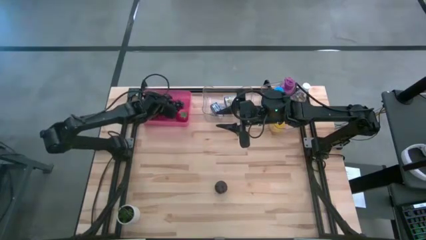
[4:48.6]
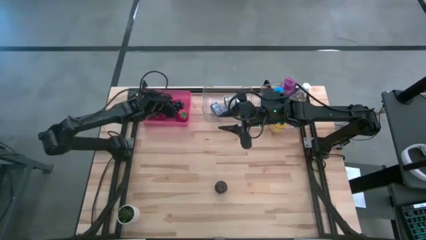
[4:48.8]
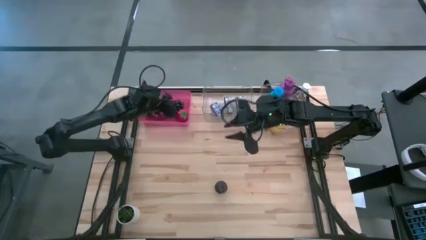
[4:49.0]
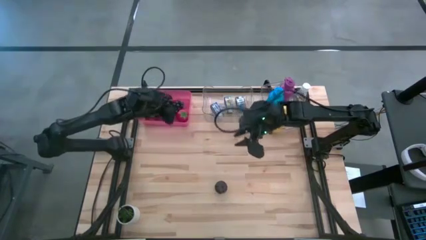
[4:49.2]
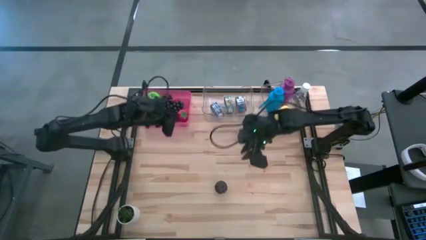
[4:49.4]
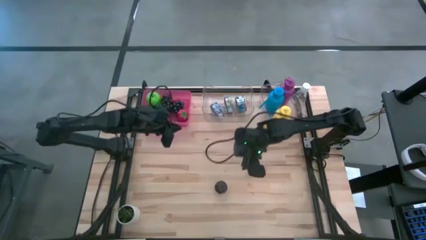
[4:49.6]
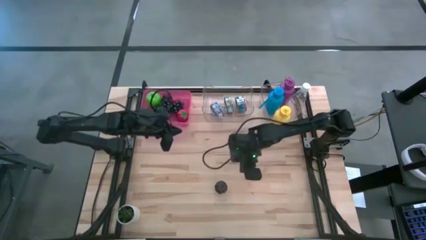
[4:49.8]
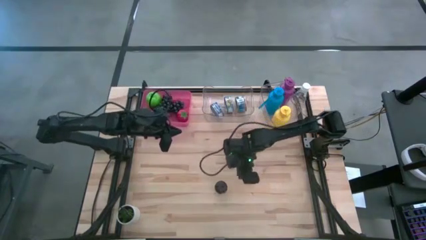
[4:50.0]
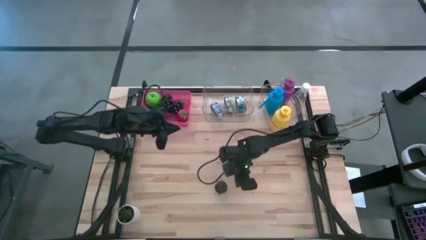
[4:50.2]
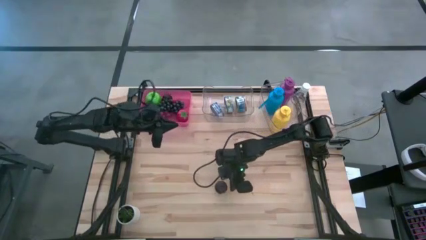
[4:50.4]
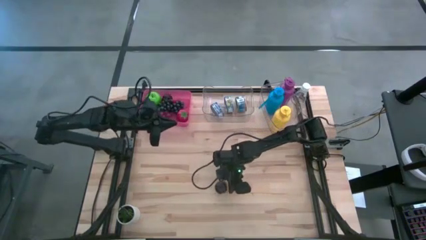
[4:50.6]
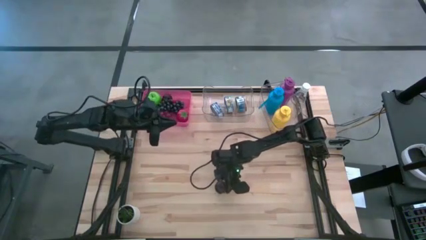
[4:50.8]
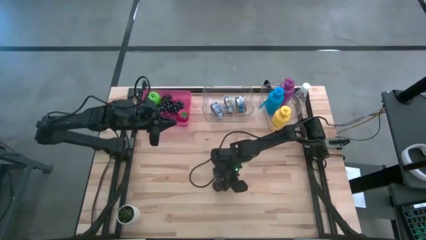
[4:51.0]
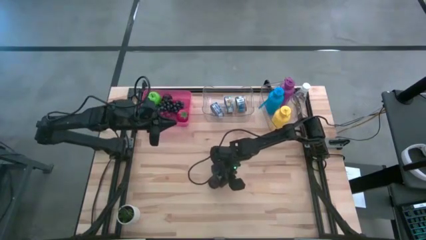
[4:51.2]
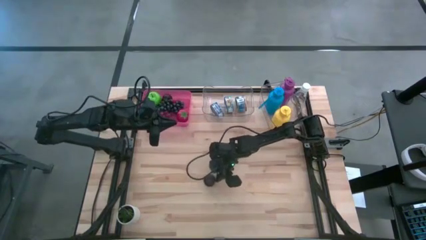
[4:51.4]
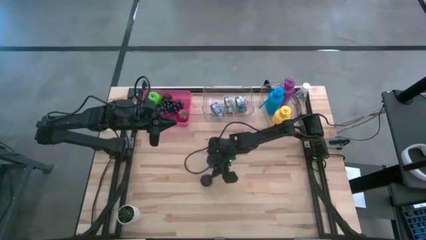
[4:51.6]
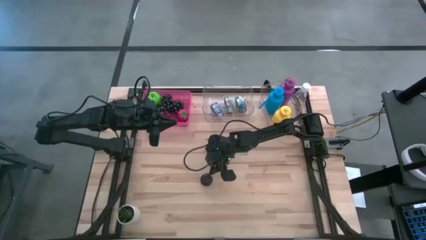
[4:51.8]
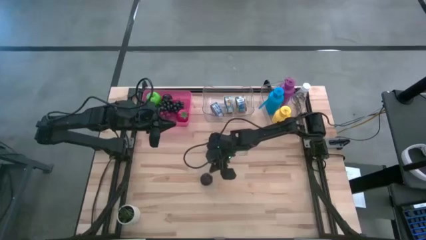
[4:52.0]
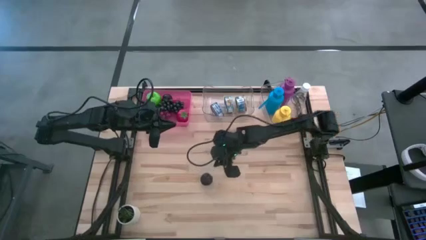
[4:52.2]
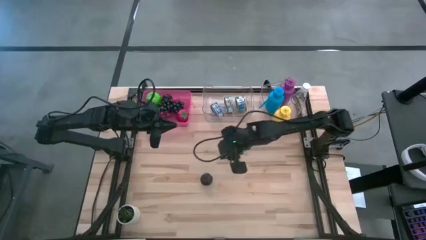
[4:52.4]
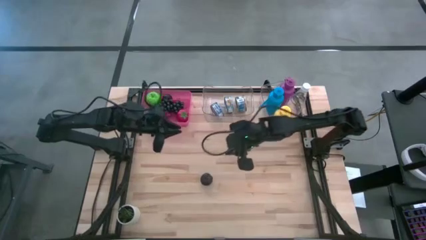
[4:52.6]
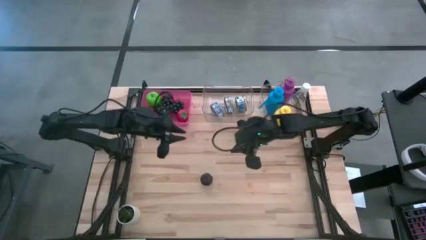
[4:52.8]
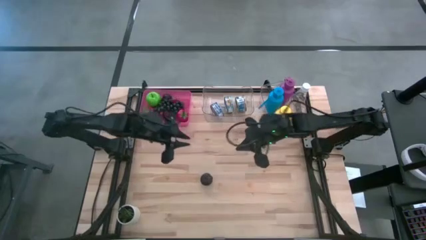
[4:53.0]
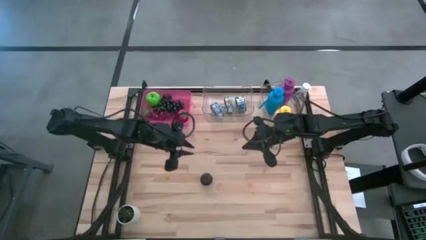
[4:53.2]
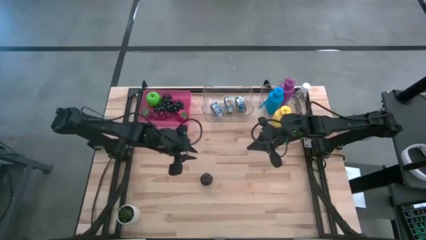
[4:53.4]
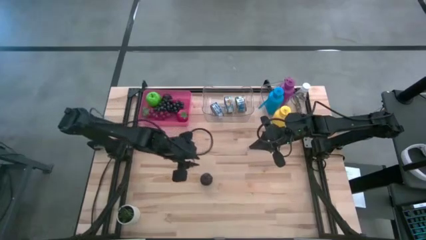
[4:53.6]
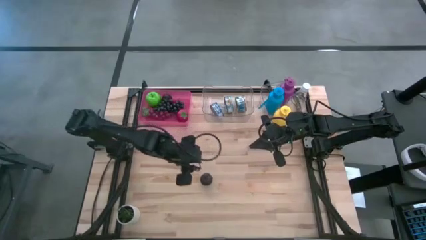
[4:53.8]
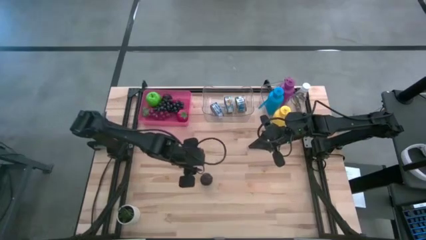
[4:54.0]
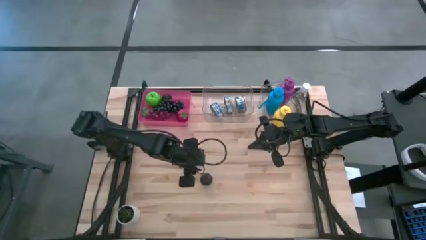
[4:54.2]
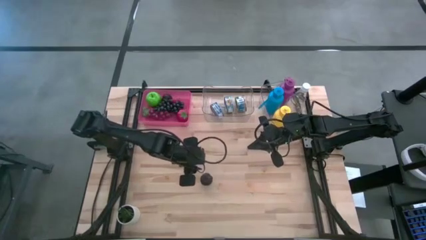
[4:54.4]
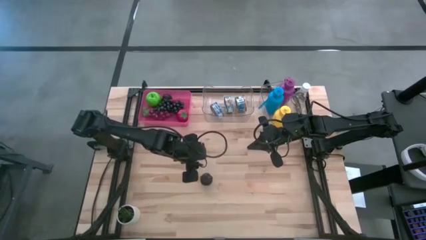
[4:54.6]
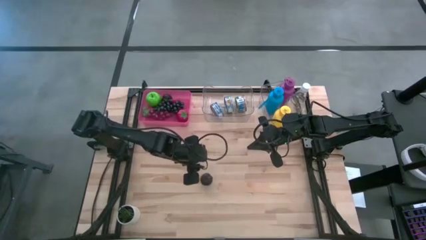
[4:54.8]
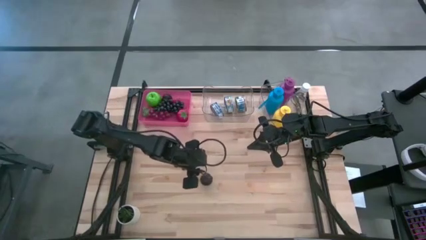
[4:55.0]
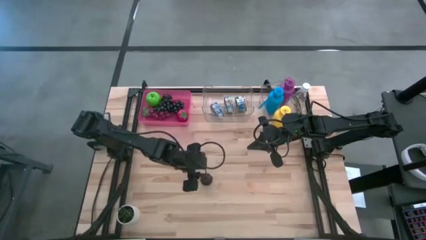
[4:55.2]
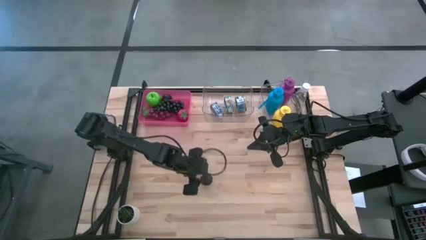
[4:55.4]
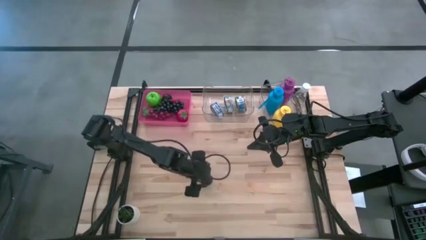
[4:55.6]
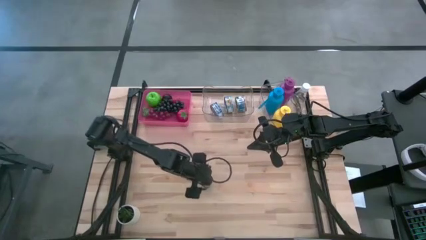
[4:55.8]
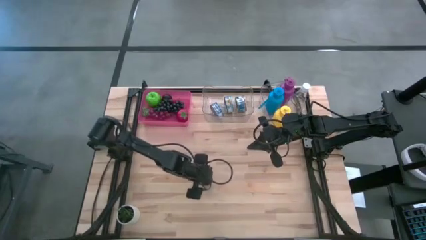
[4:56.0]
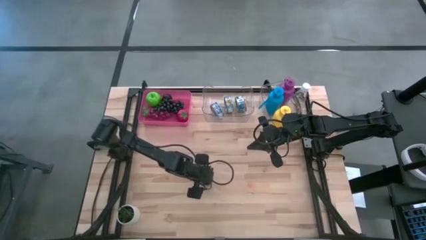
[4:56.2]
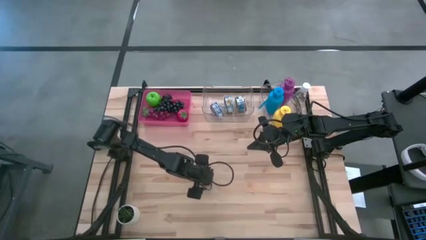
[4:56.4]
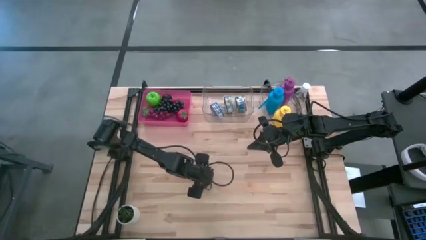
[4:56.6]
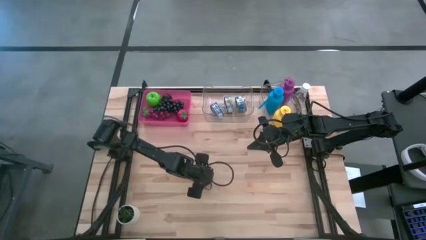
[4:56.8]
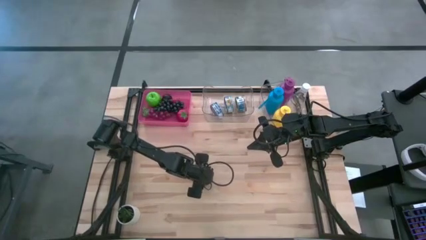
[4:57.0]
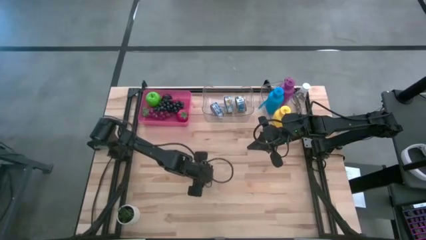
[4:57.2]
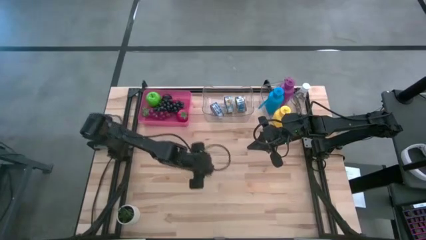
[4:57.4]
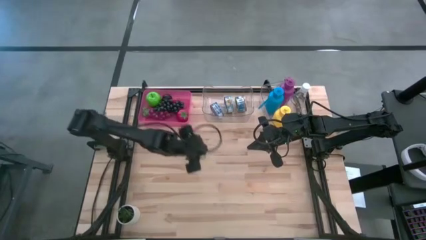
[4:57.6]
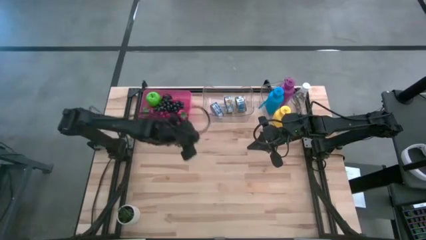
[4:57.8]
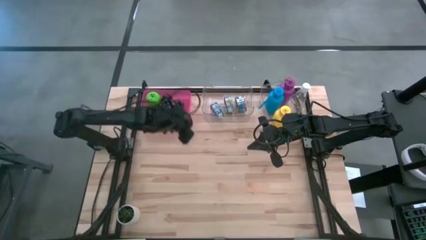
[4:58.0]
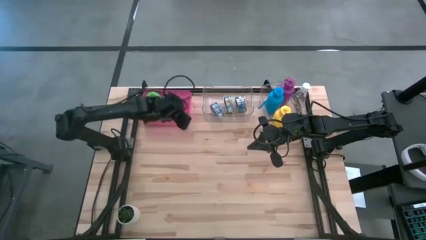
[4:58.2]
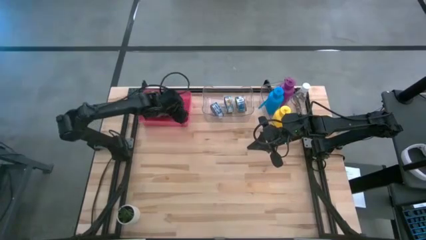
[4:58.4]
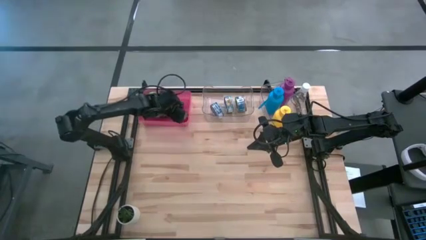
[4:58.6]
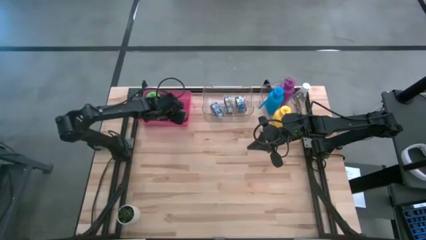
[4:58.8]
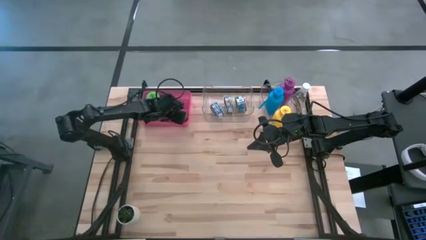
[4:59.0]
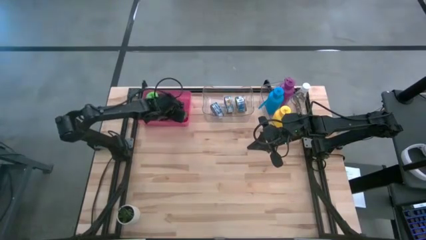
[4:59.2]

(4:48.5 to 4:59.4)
Task: Pick & Place Food Item
Put the black plum into the red transparent bin

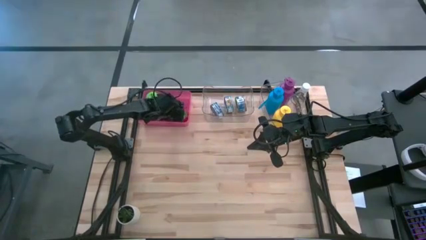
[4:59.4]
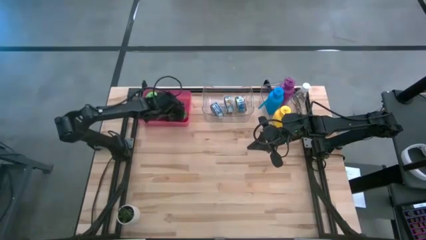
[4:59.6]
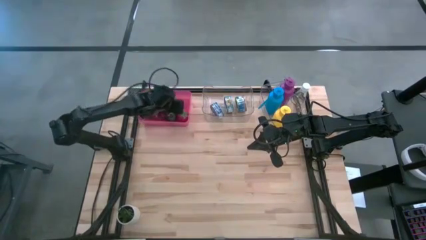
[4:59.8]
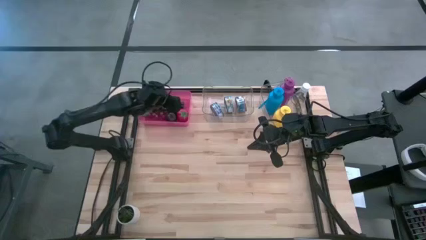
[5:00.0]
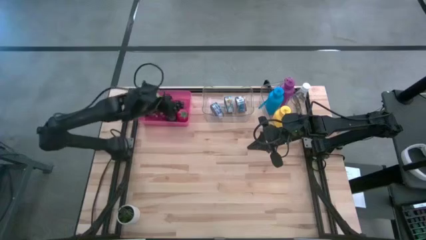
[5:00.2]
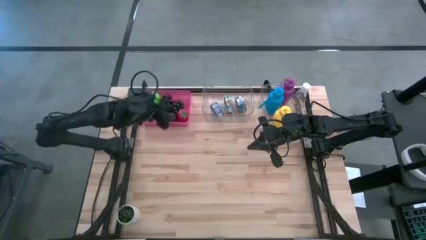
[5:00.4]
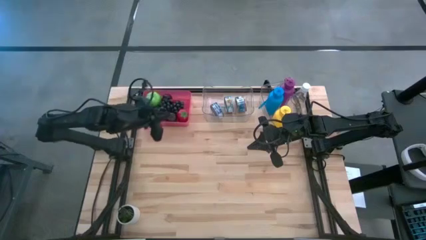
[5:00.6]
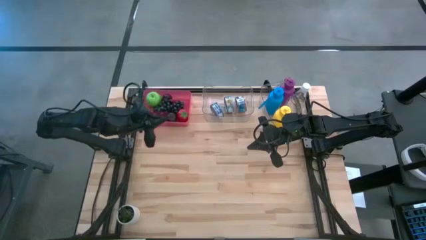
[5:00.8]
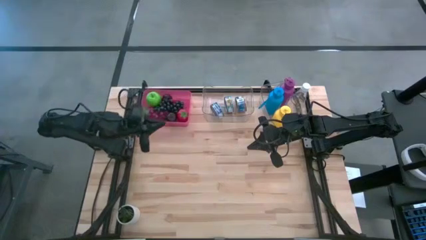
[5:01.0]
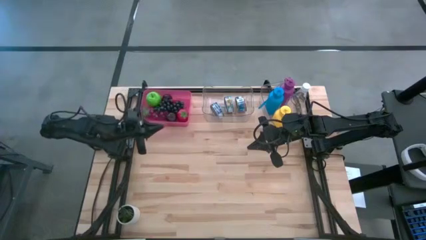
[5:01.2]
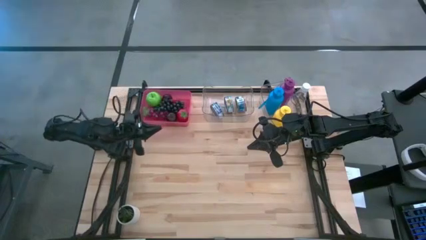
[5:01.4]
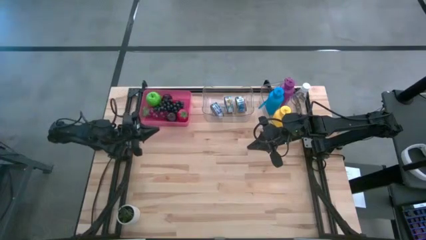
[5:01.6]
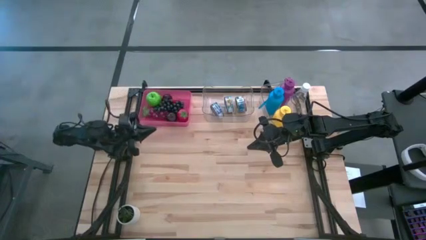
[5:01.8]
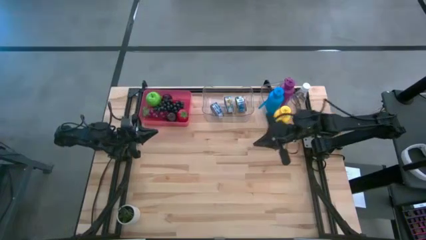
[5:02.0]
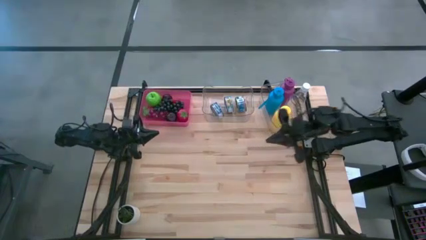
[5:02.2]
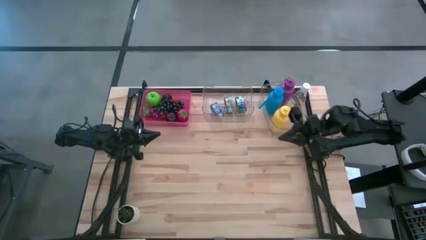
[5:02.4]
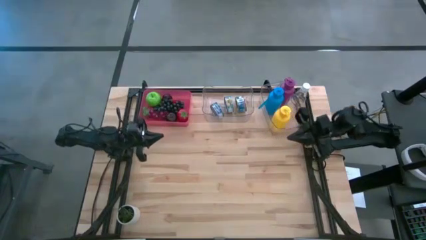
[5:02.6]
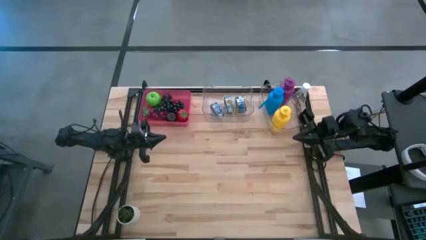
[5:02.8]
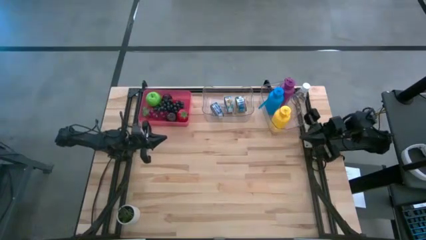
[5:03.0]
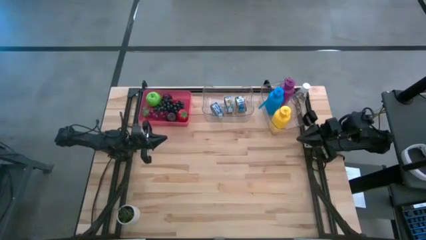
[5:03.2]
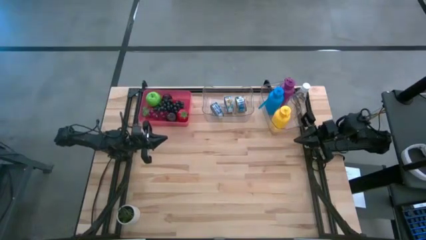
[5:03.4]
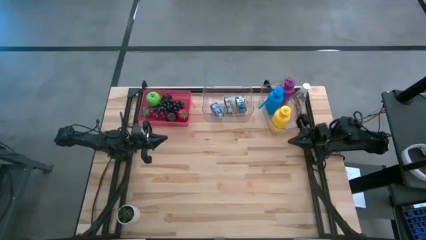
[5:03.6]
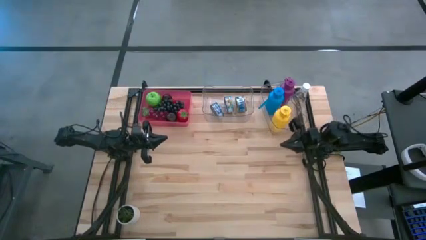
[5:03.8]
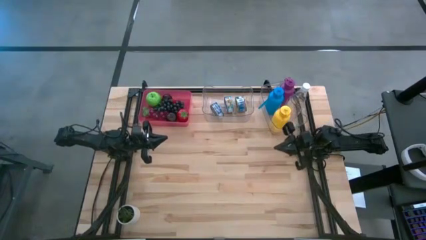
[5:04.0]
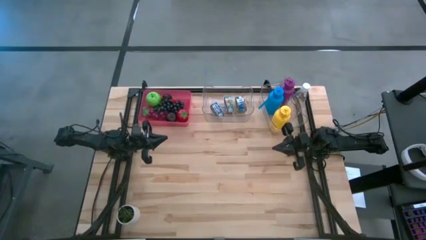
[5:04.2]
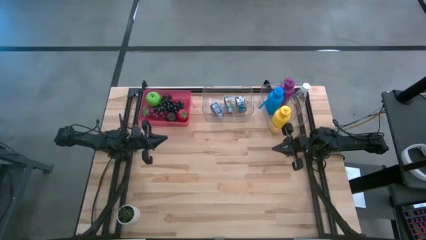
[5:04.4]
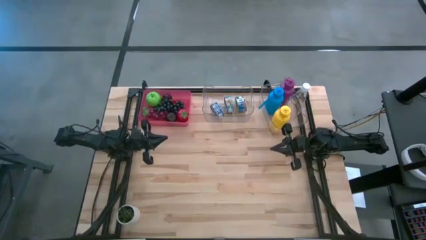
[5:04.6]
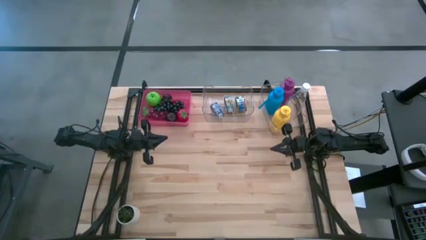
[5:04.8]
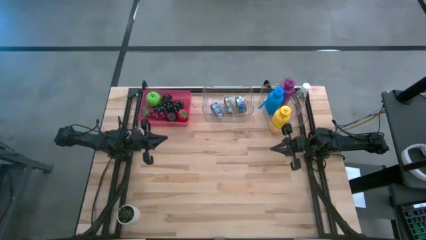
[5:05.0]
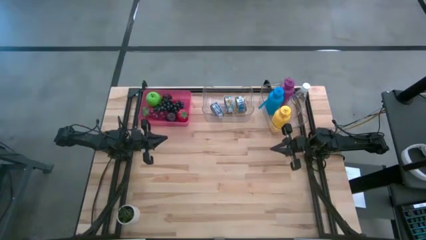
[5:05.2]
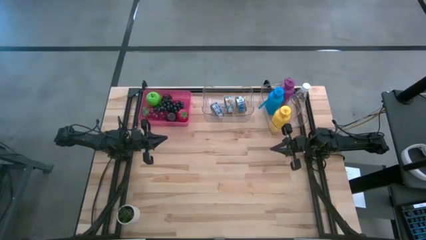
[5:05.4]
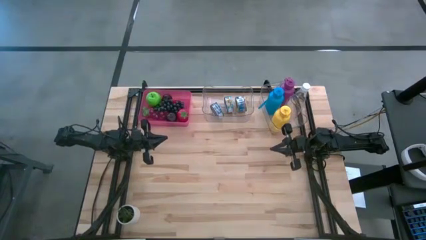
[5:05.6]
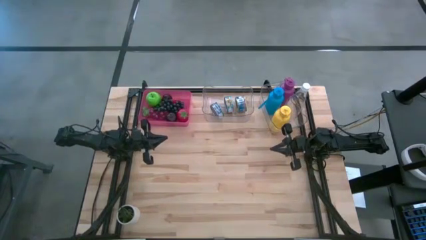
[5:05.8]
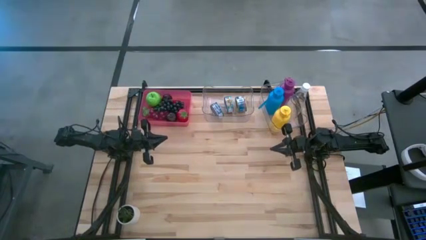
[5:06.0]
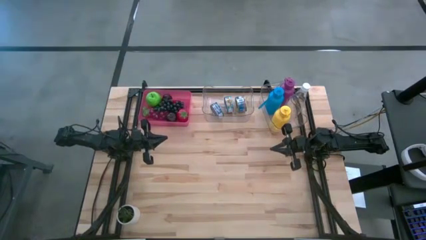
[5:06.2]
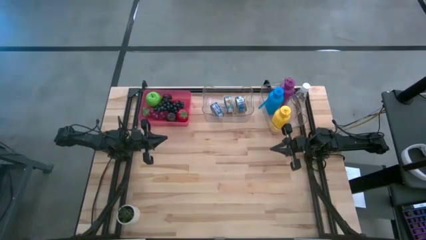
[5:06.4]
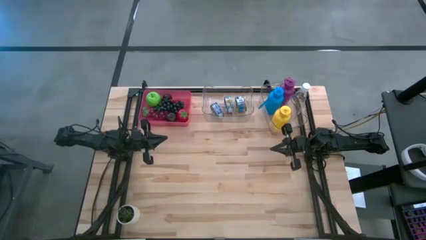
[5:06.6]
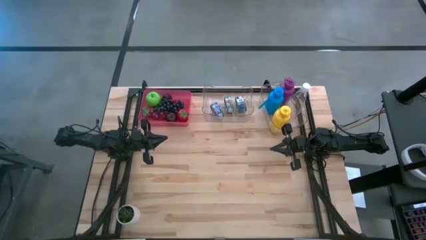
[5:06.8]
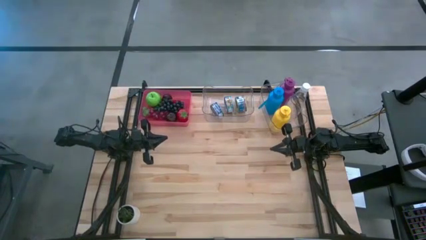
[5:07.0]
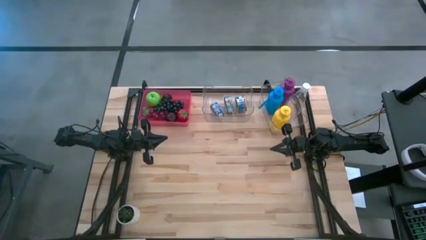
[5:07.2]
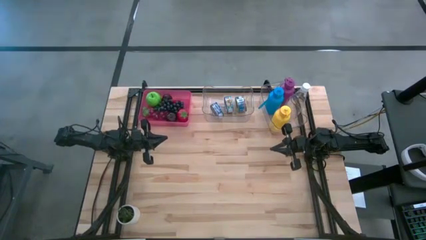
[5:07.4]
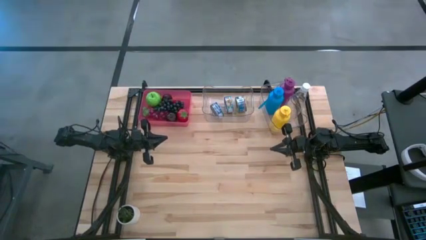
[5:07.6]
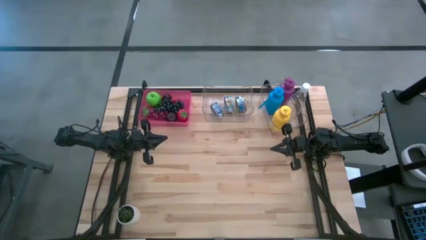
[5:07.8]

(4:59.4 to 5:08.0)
Return to Home Position
